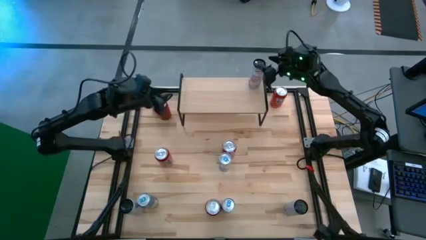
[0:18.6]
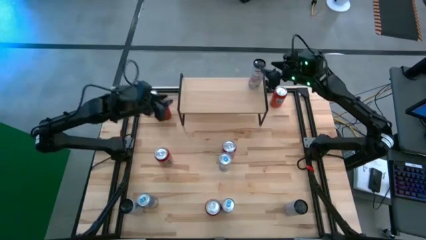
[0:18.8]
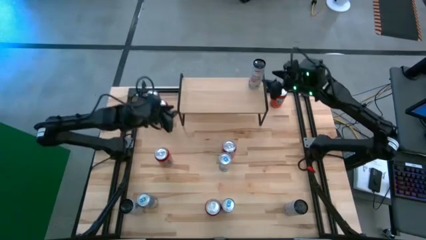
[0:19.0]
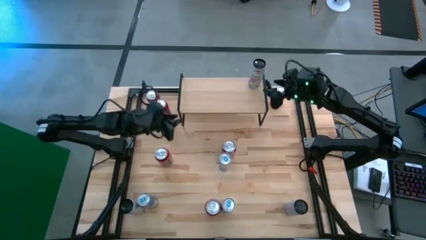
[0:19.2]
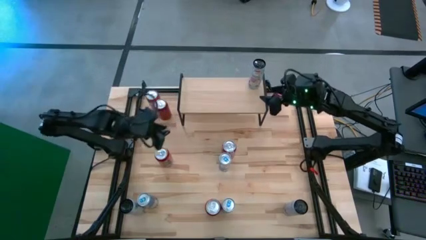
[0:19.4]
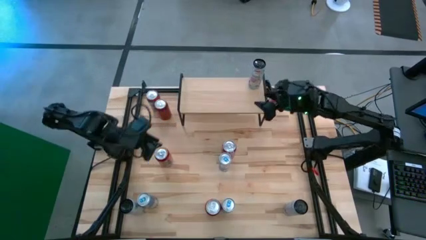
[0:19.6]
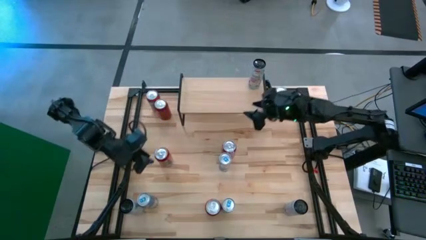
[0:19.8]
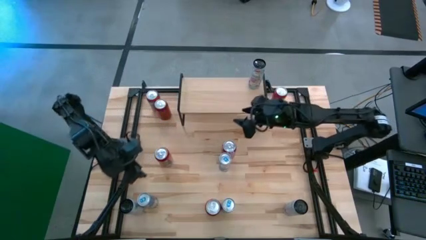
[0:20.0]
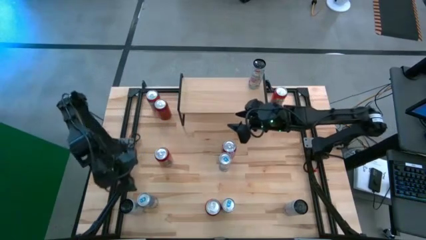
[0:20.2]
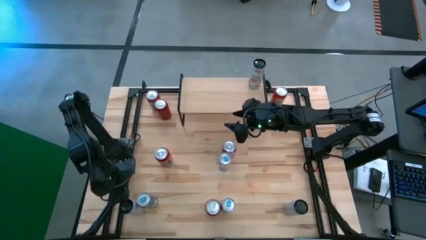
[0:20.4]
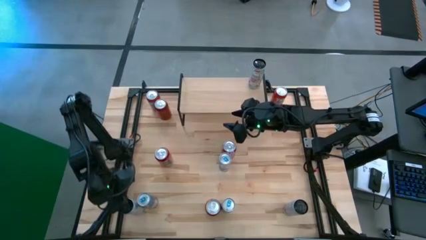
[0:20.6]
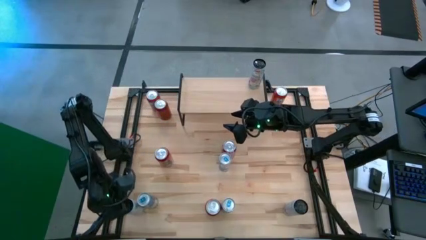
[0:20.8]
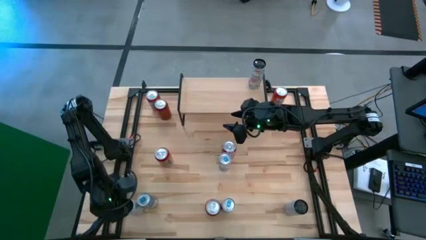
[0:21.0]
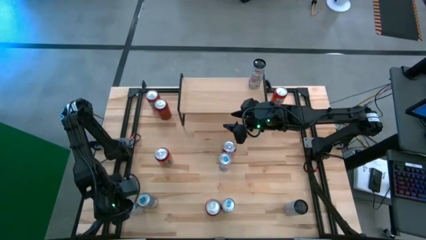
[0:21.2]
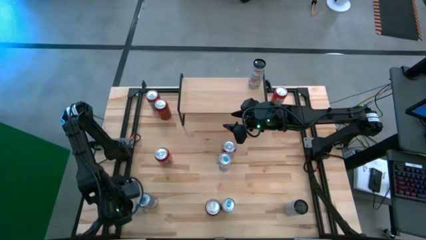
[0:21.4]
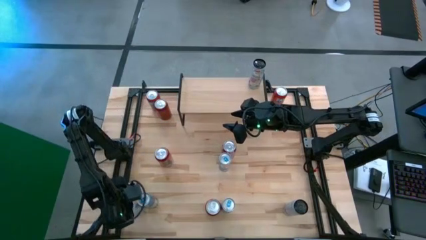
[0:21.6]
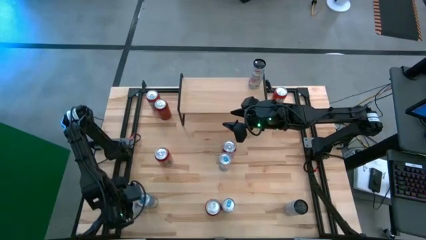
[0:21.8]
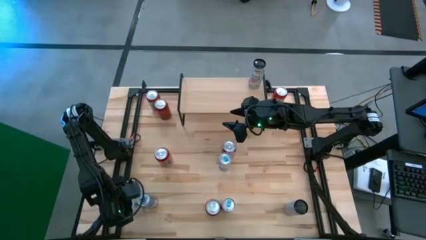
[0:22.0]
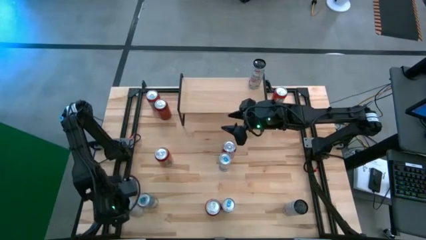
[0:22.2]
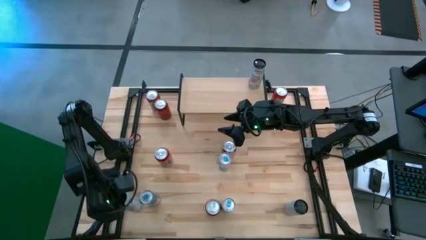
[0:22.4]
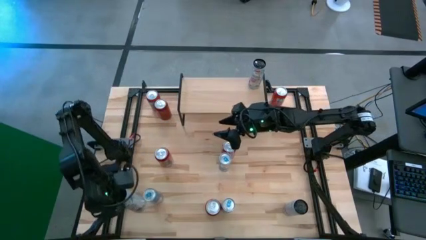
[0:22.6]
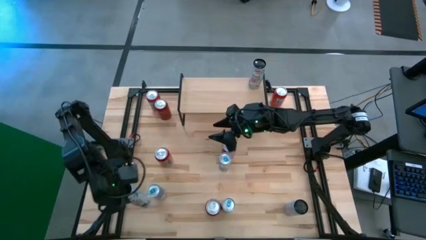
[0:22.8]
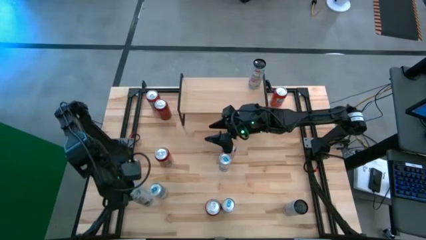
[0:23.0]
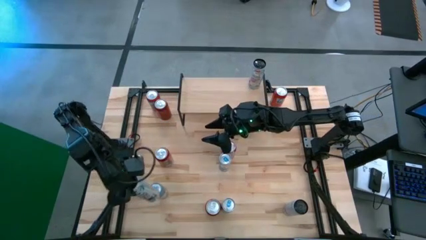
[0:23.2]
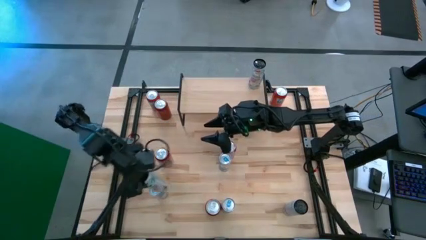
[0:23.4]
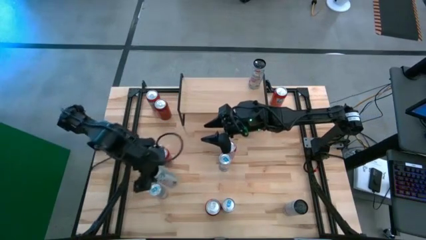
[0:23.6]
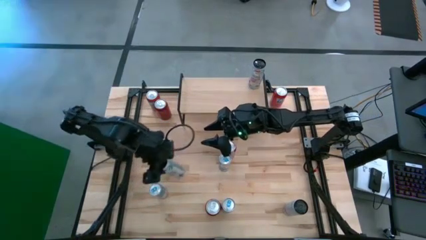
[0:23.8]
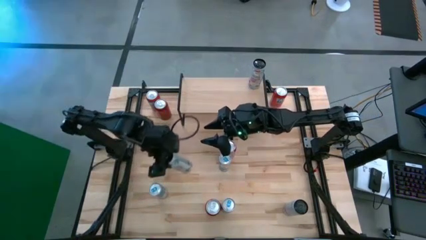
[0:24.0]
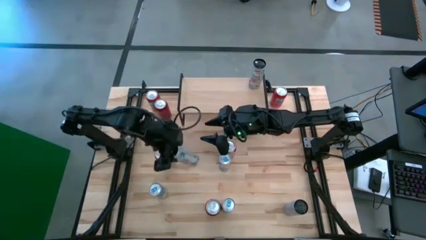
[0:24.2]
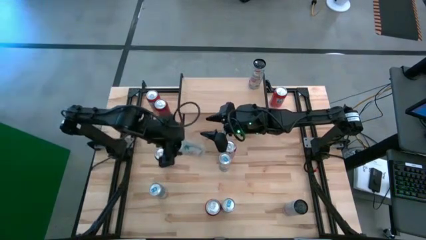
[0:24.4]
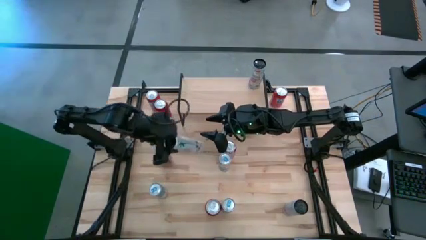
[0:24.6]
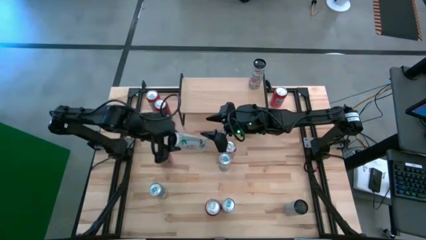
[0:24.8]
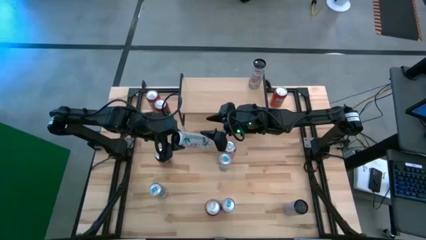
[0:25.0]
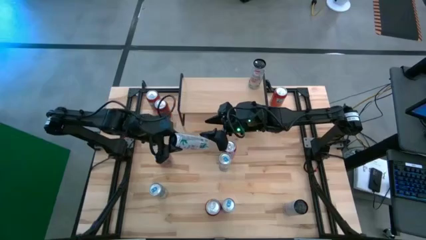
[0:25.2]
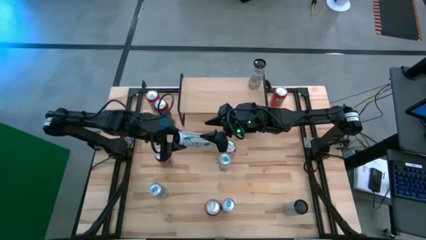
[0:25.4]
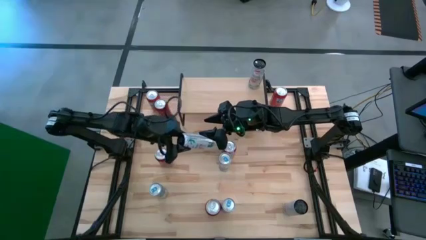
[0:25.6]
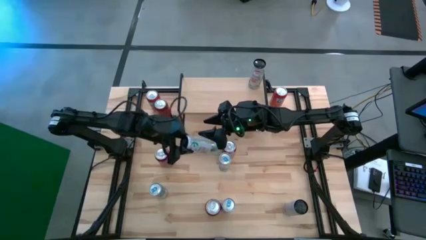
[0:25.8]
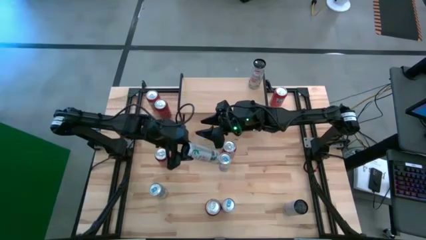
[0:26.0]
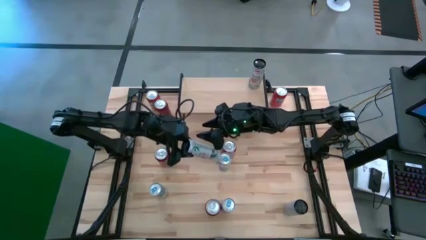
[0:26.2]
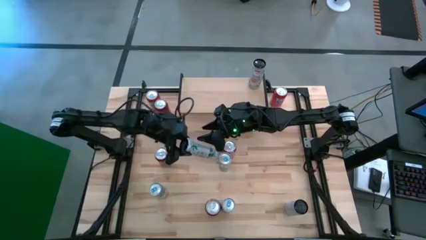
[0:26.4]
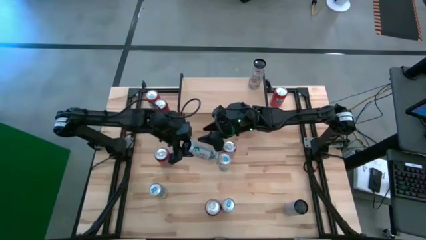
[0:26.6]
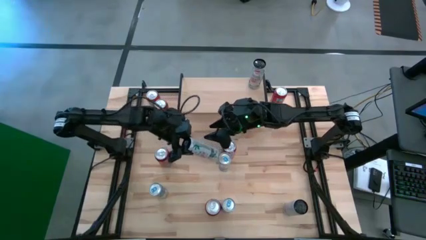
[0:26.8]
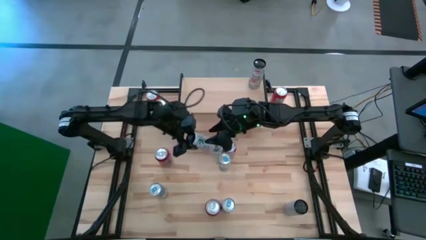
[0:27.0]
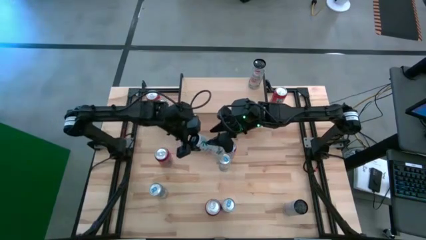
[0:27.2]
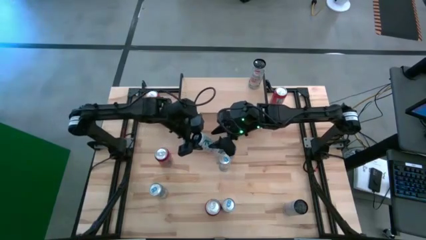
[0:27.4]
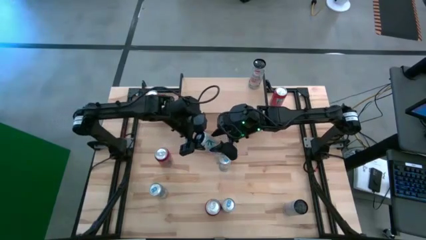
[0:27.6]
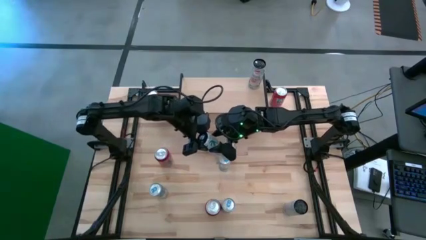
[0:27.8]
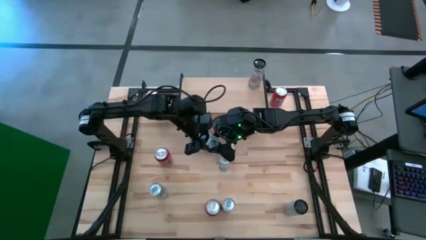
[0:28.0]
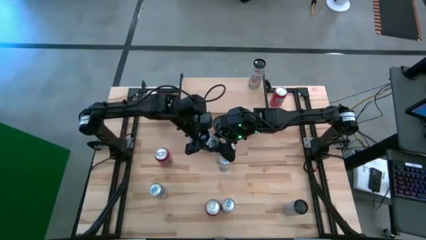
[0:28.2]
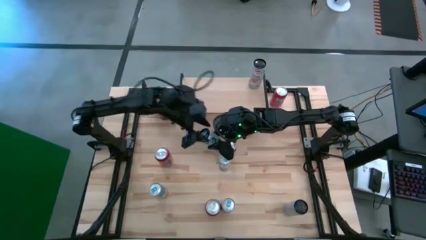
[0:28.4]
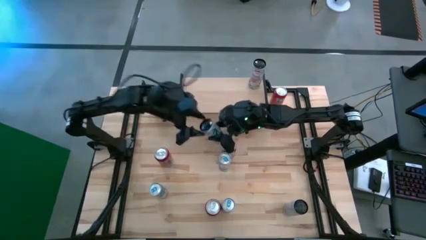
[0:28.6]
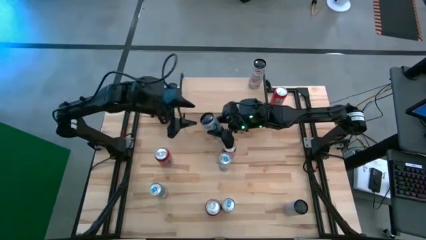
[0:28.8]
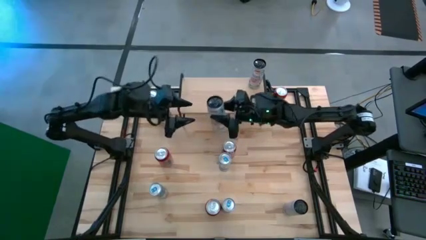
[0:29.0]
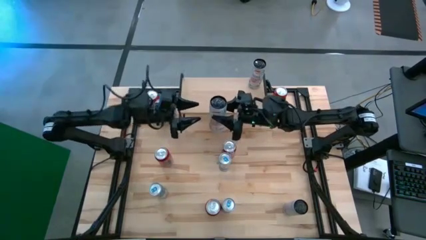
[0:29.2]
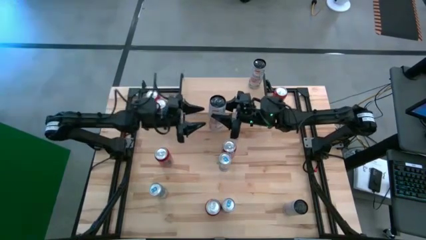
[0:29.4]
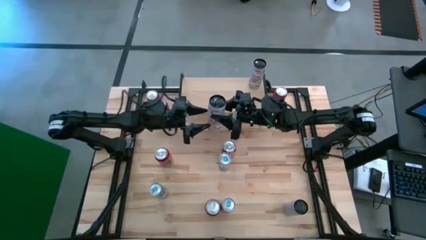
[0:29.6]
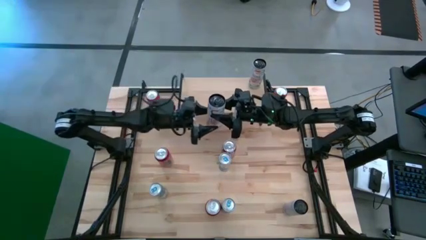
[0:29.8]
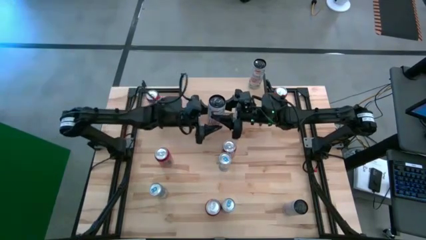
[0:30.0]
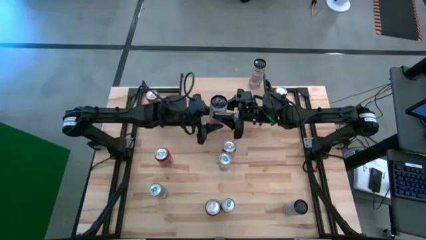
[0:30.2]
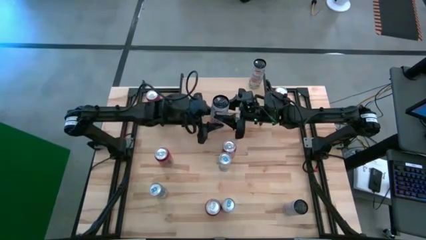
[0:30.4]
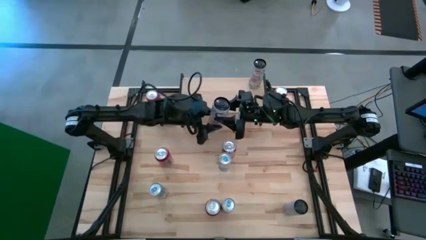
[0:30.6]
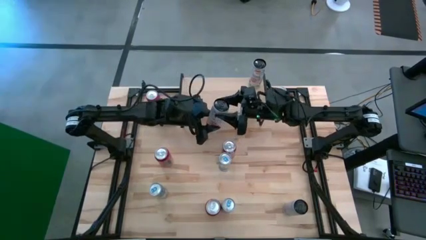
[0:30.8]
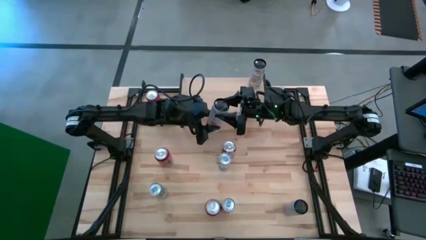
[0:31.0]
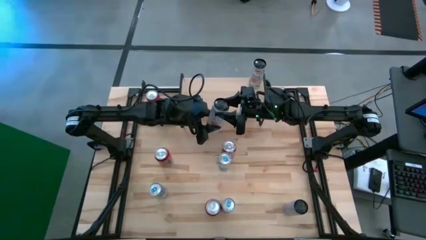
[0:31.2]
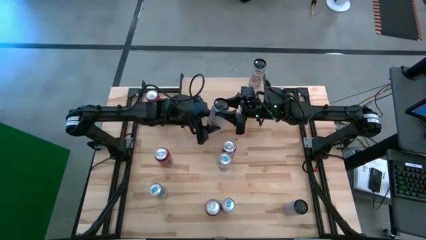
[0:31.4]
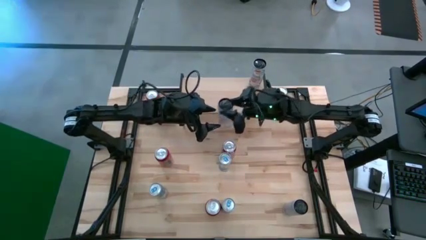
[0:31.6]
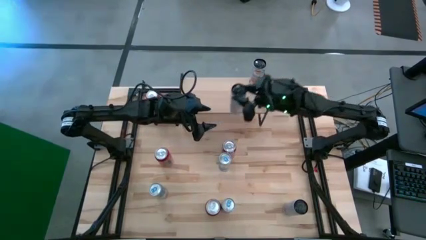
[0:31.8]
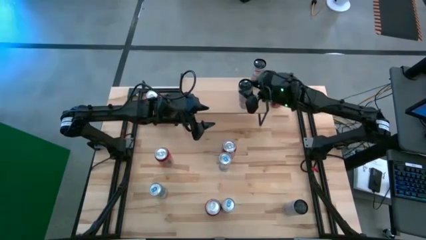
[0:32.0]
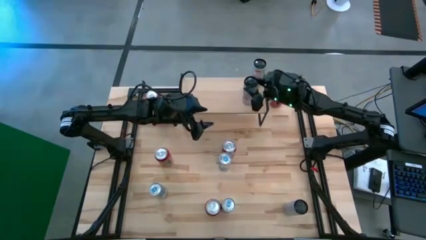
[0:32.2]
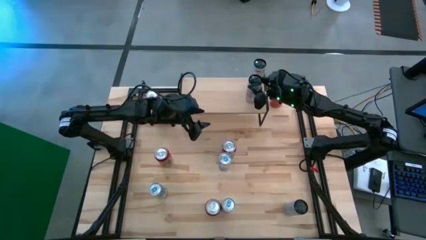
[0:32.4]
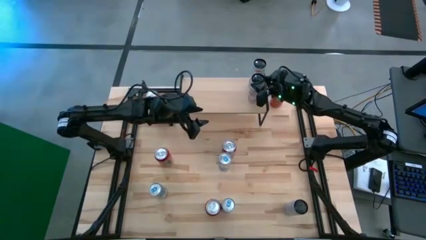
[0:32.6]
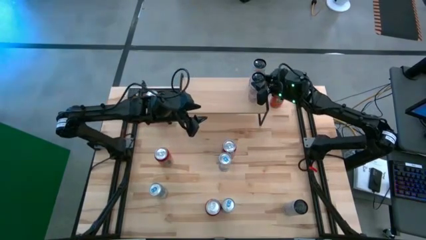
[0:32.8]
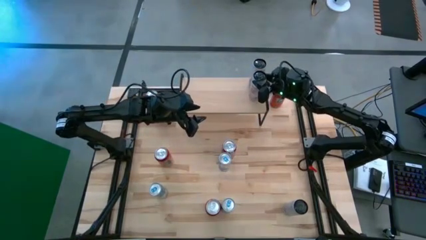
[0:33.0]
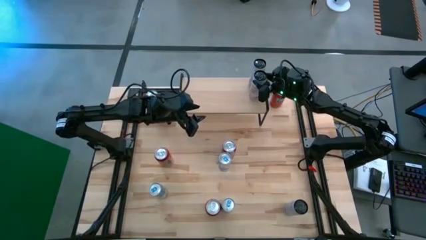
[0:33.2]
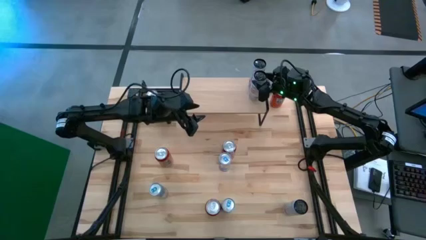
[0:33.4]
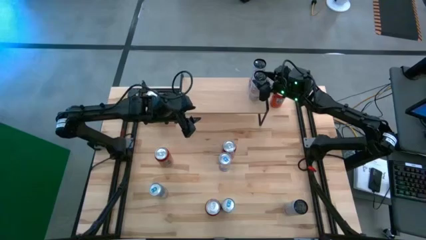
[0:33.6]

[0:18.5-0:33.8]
Task: Place canned beverage on shelf
Put the left white pink can aligned with the other white pink soda can on the shelf
